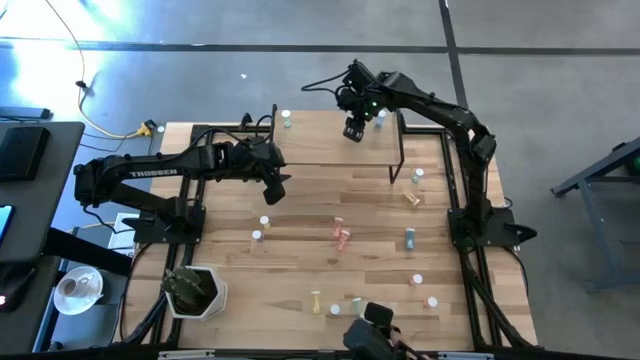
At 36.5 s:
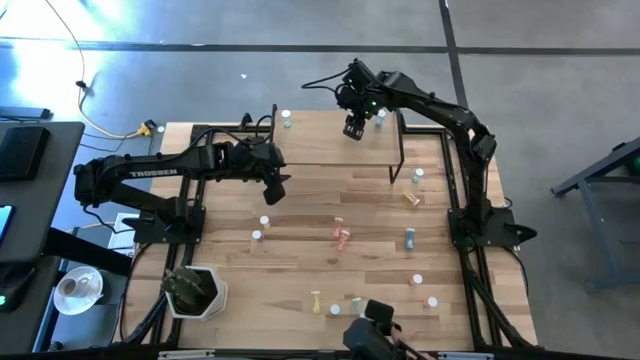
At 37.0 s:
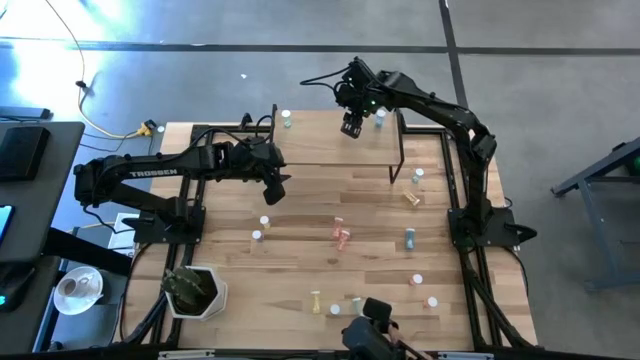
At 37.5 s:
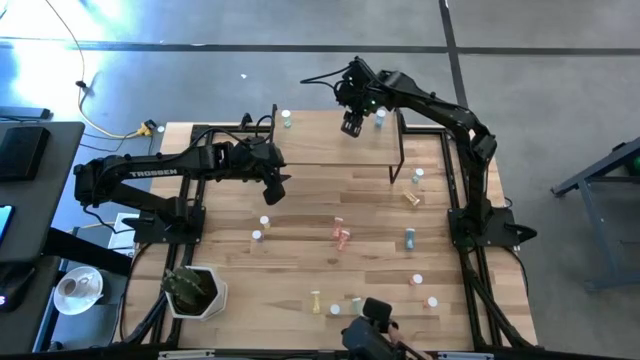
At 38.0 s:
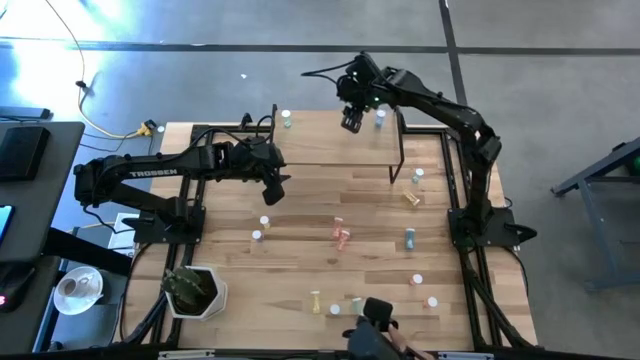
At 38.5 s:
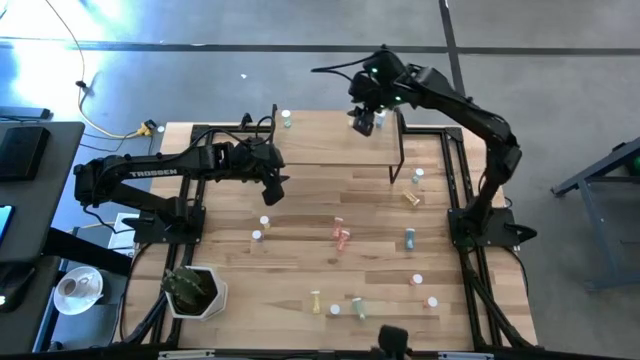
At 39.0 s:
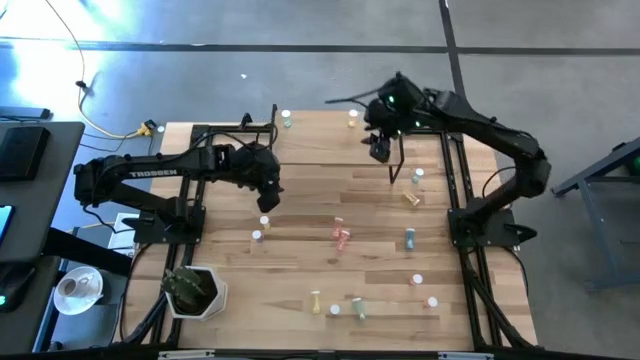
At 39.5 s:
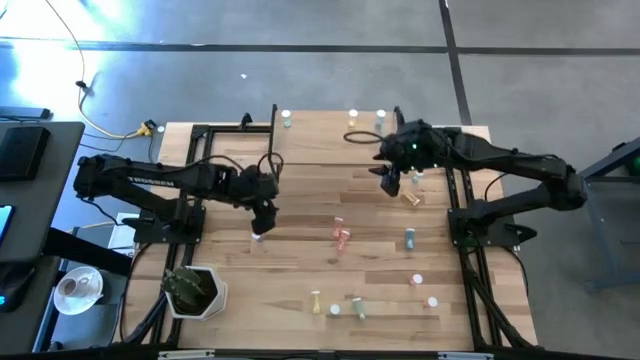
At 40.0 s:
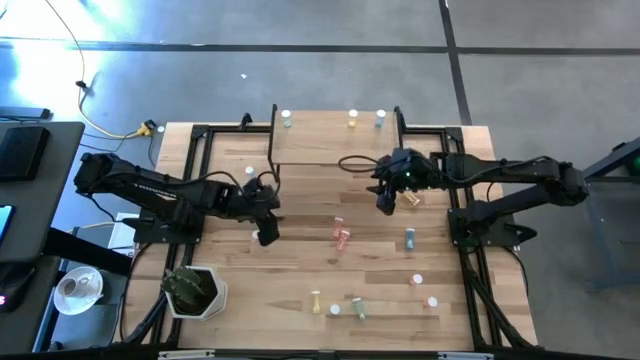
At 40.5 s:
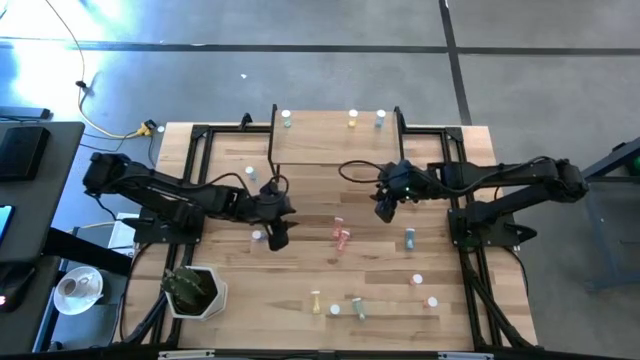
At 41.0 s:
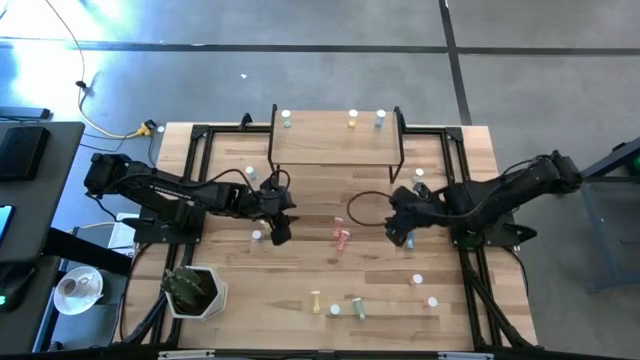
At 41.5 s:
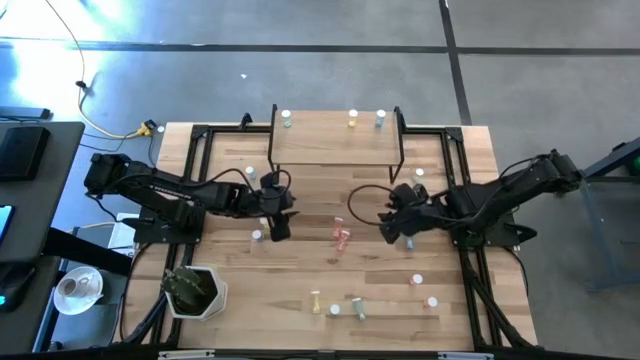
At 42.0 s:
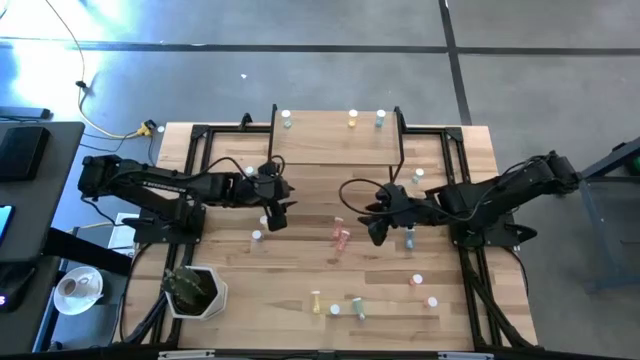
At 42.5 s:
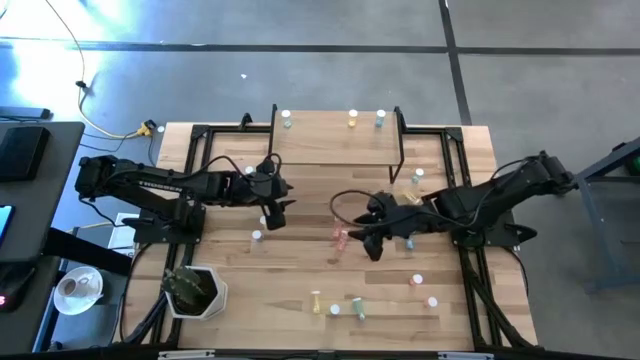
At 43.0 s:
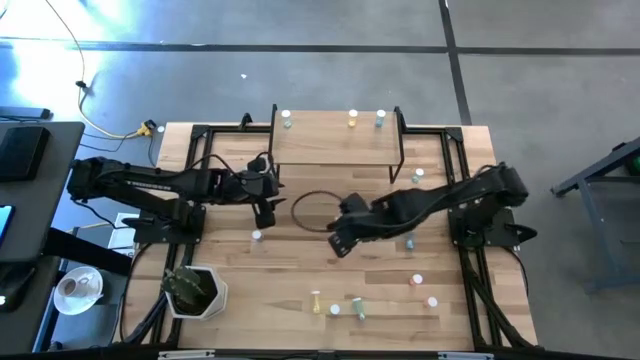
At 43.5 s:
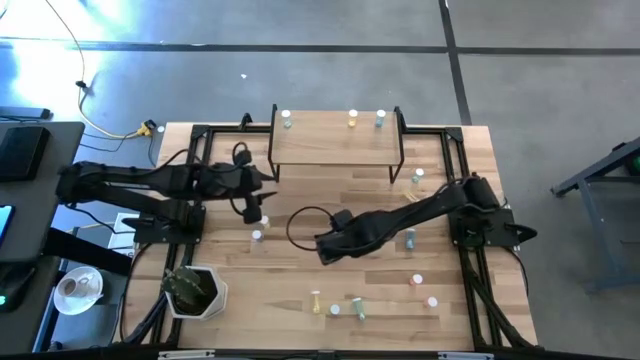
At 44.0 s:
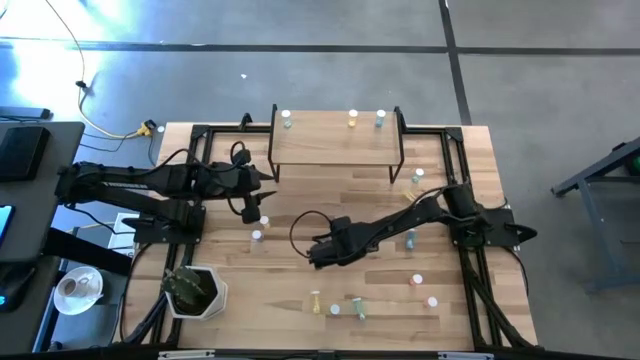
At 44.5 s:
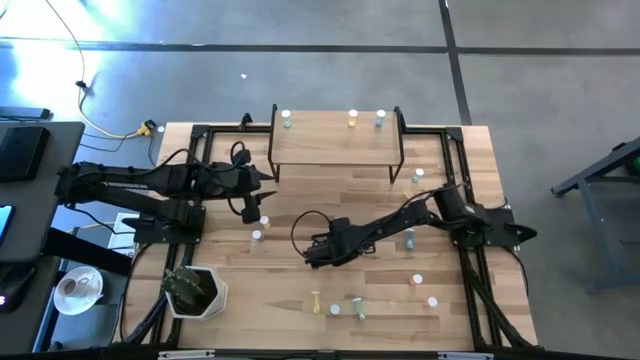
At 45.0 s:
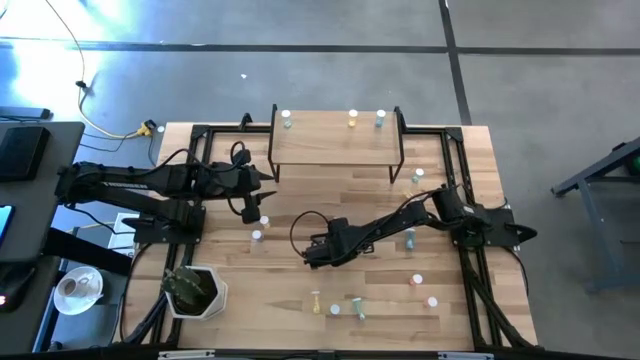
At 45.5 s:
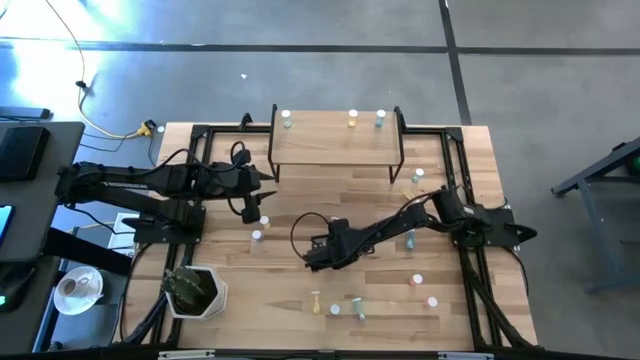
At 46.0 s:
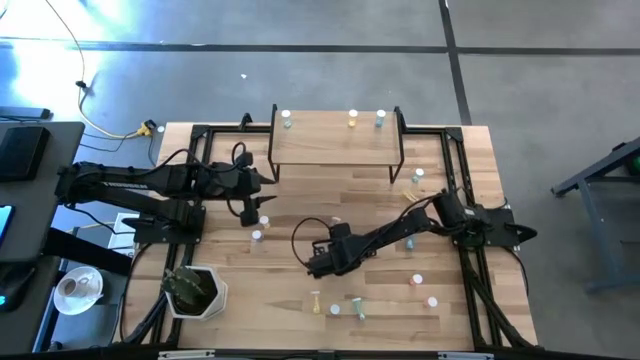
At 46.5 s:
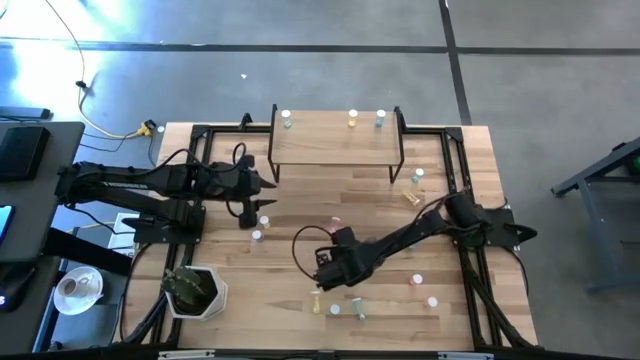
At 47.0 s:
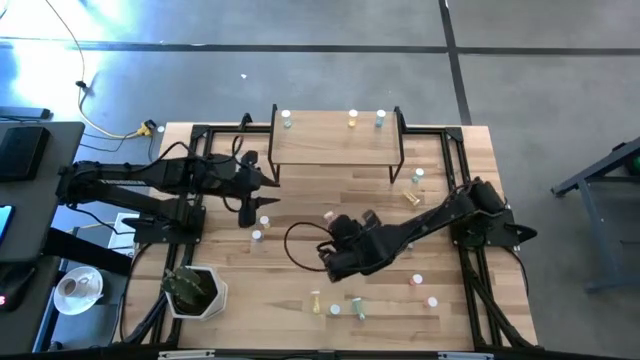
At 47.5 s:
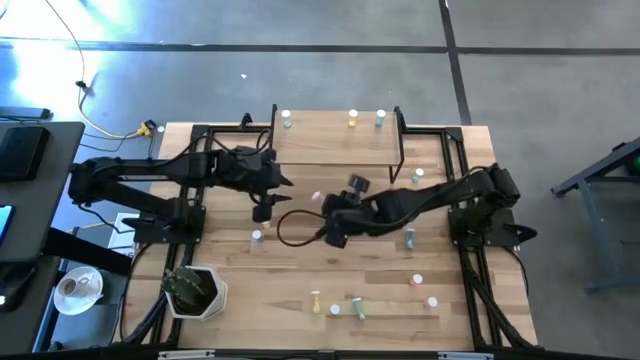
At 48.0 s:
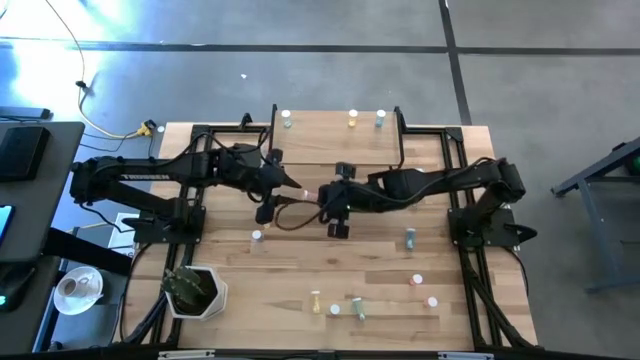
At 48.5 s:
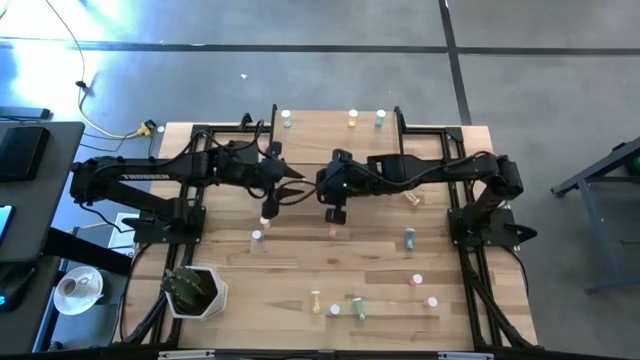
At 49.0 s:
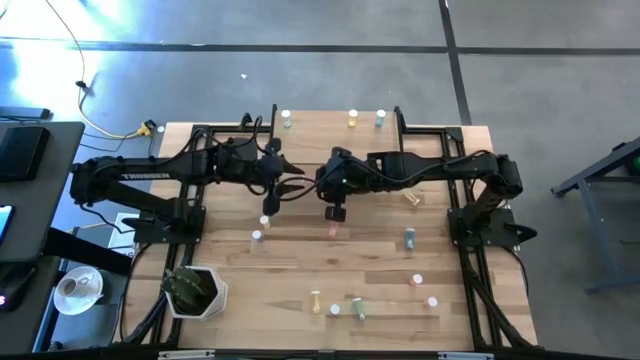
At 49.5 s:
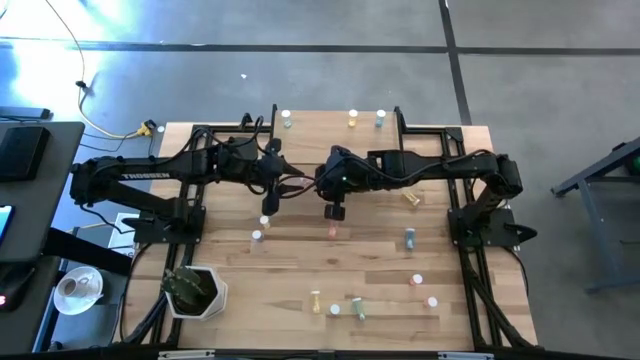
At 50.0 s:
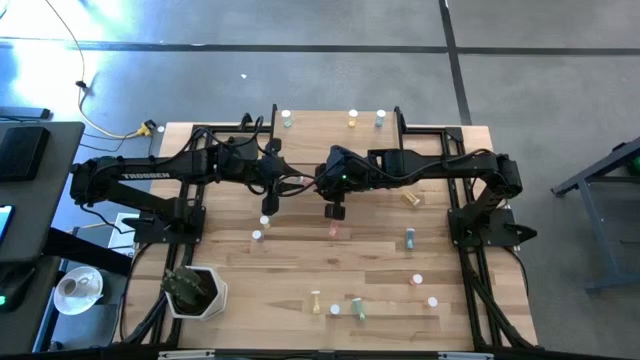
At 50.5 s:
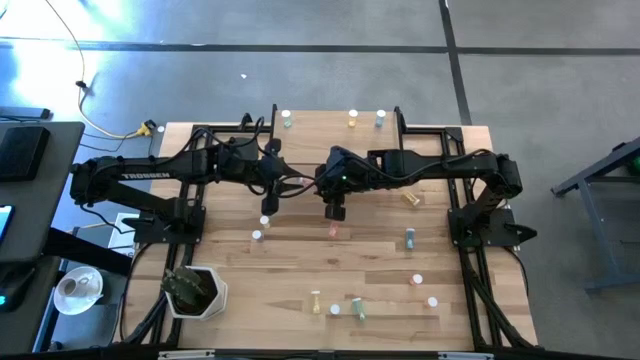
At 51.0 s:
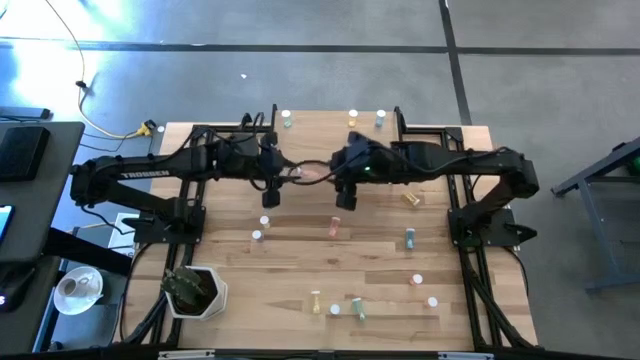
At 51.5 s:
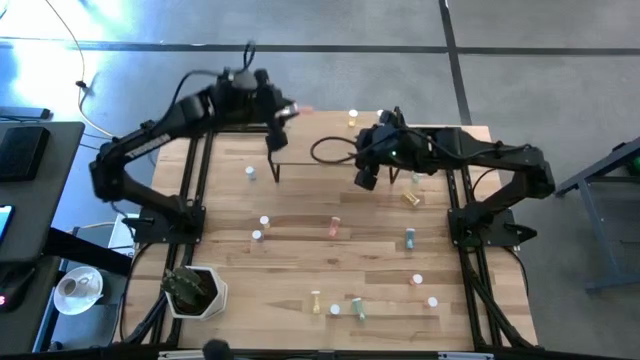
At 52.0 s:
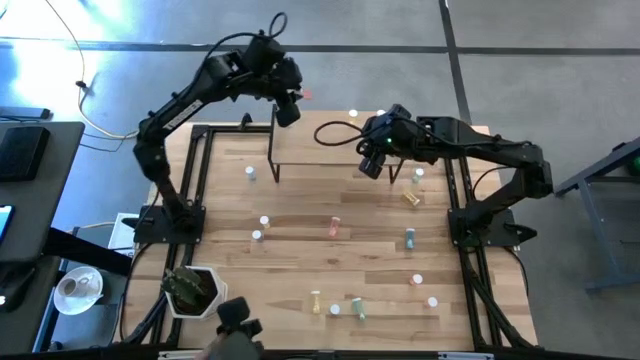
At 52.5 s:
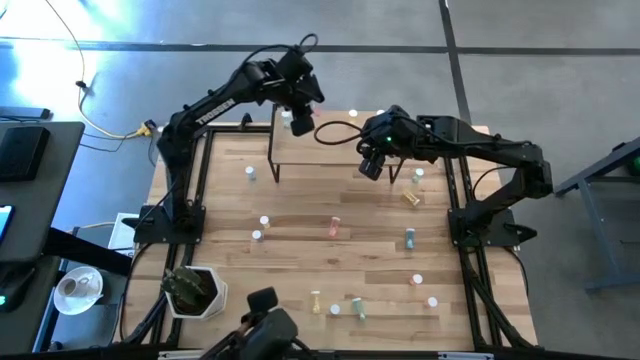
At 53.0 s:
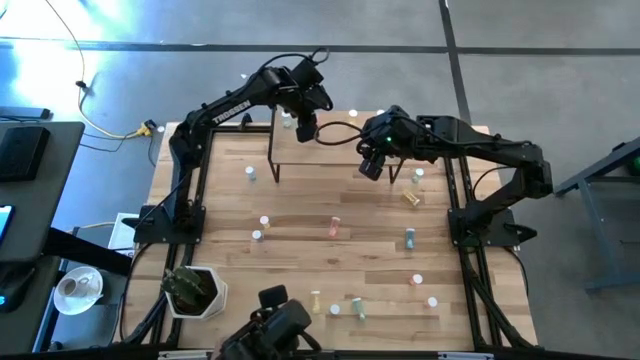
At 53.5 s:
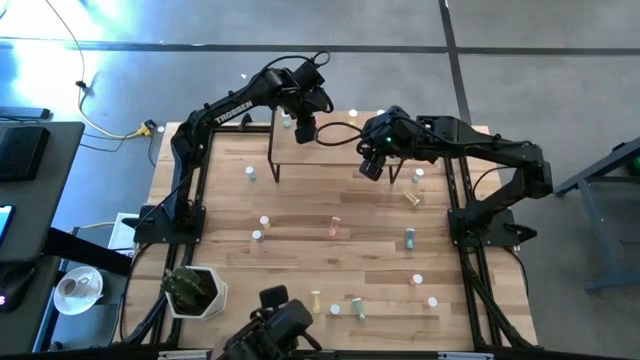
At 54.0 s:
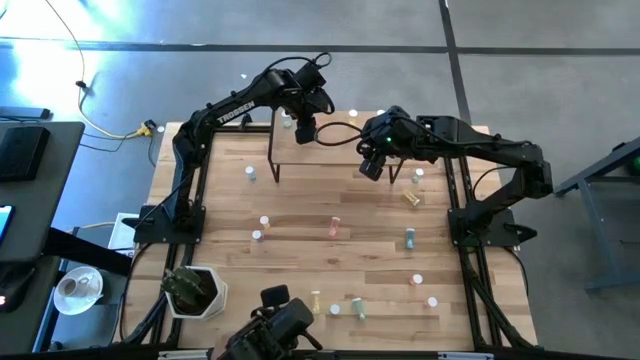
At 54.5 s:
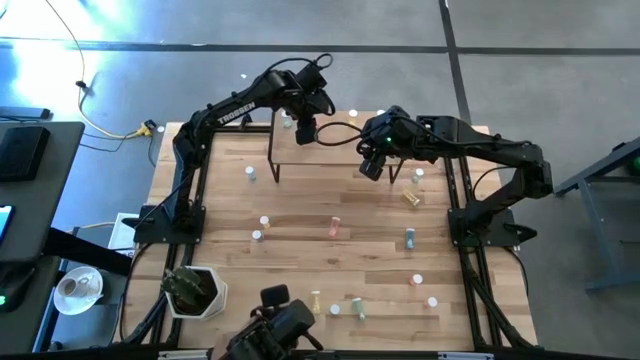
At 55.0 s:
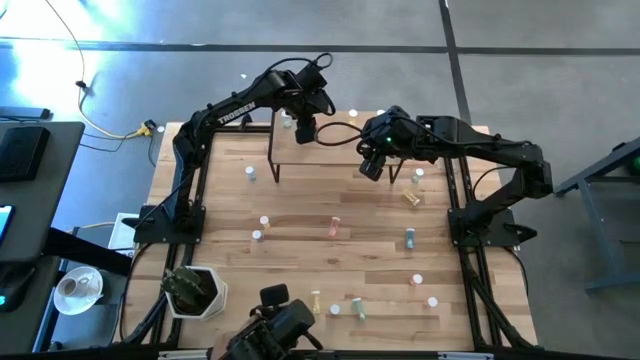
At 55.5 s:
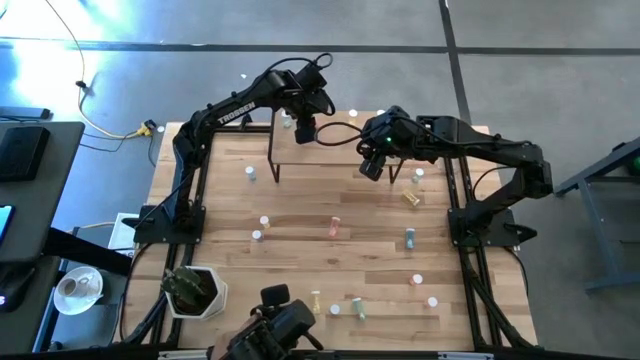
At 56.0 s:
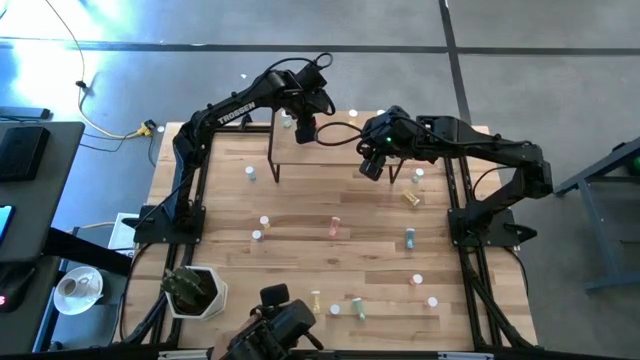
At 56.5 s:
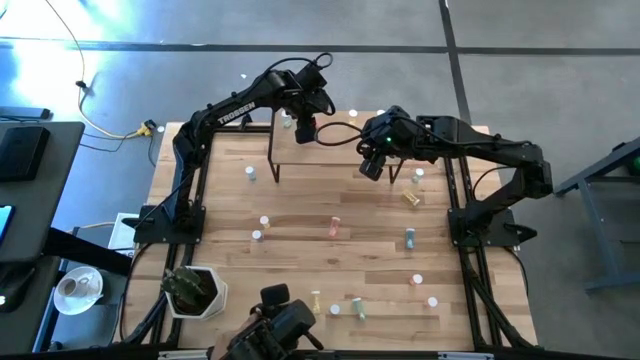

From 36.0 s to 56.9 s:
Task: Pick and place medicine bottles onto shelf by color
Put the pink pill bottle on the shelf

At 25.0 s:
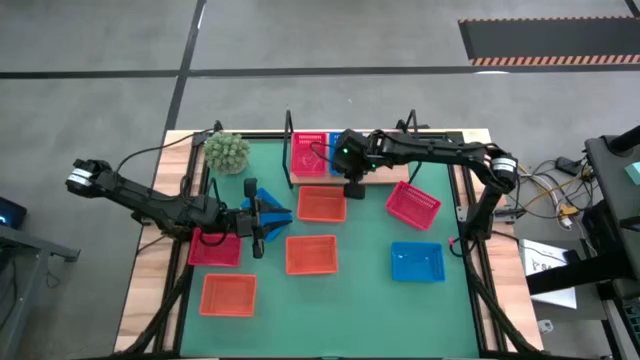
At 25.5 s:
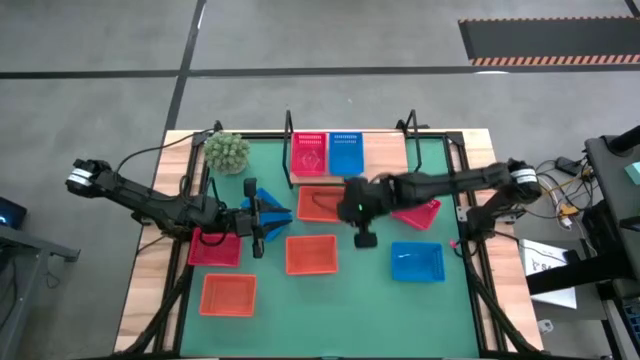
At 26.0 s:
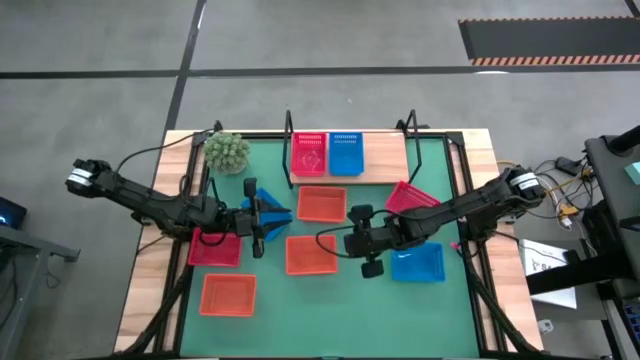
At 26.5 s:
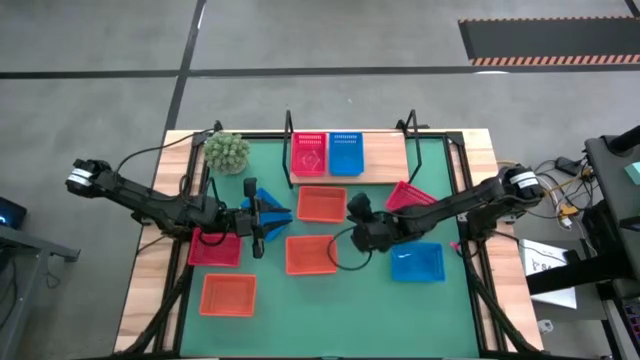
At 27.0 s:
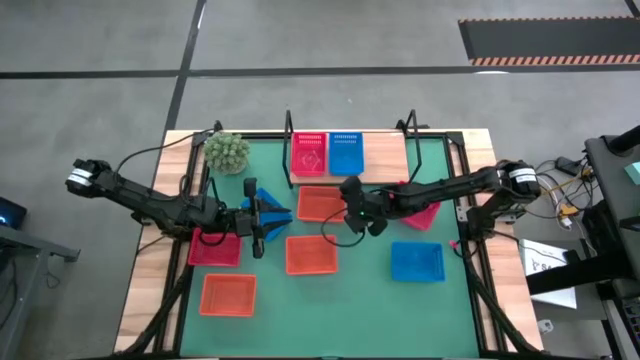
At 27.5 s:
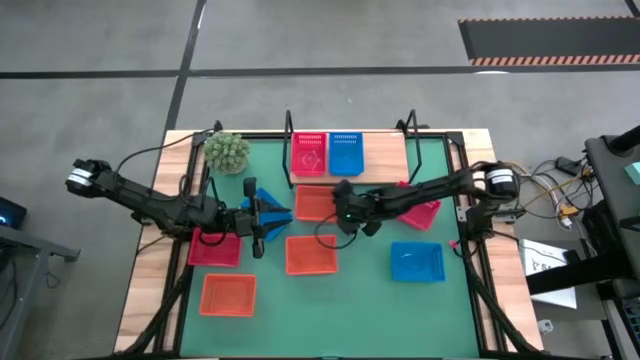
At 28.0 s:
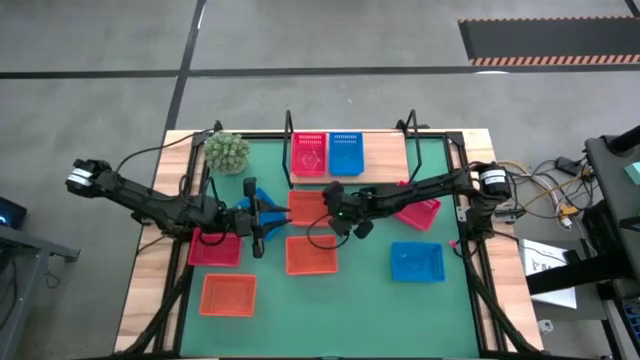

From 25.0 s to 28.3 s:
Task: Stack baskets on shelf by color
Put the top right orange bin on the shelf
